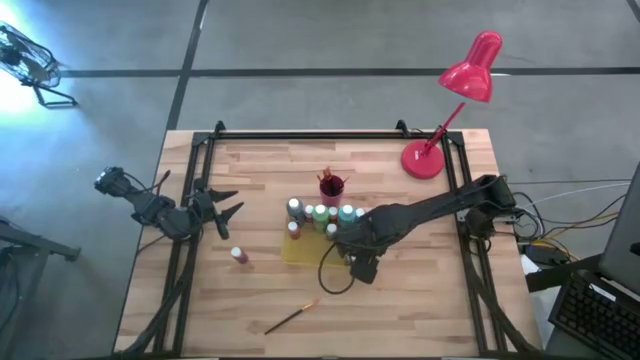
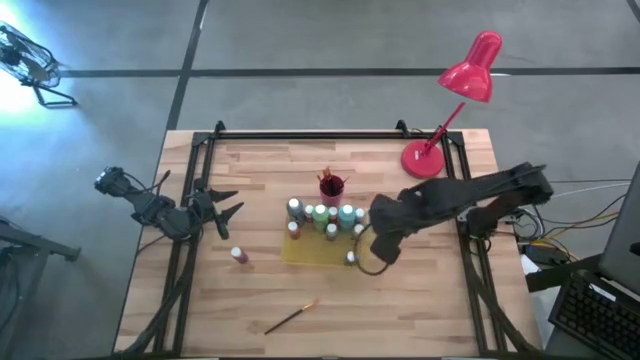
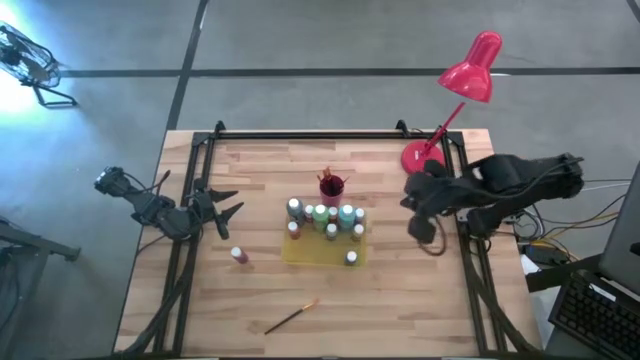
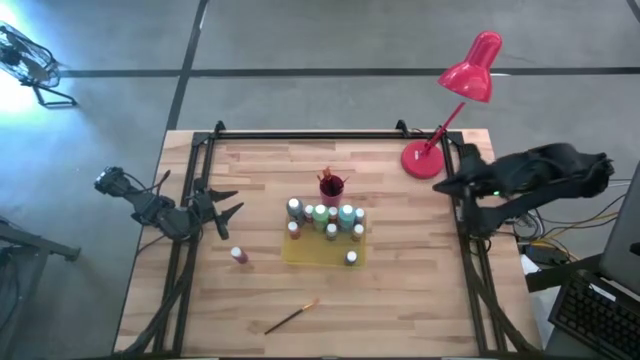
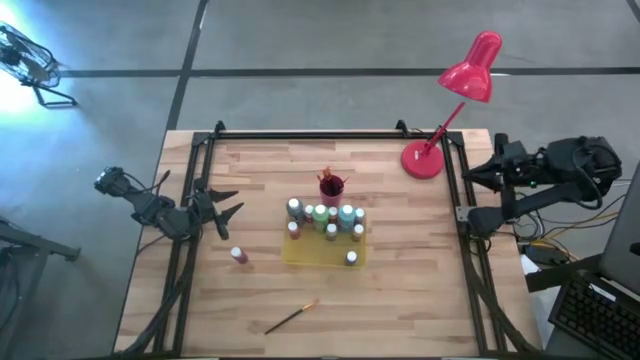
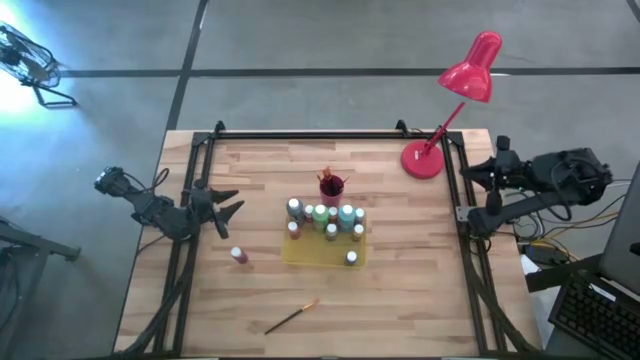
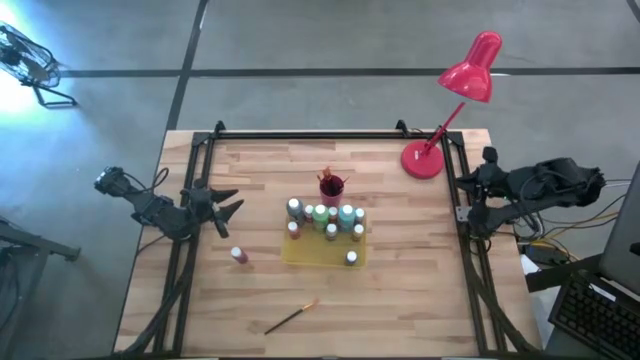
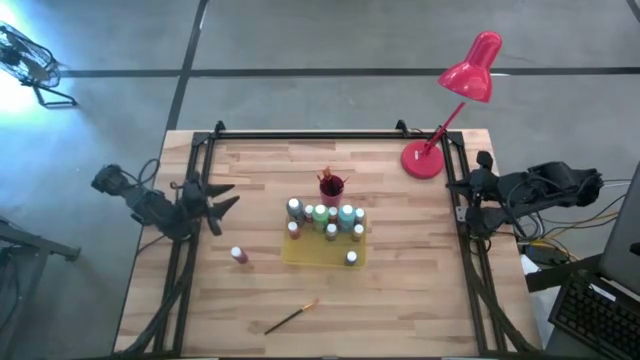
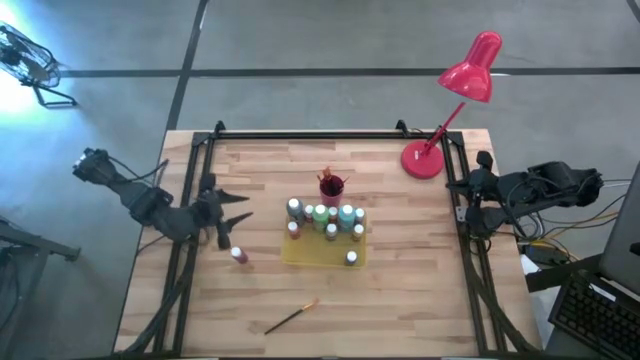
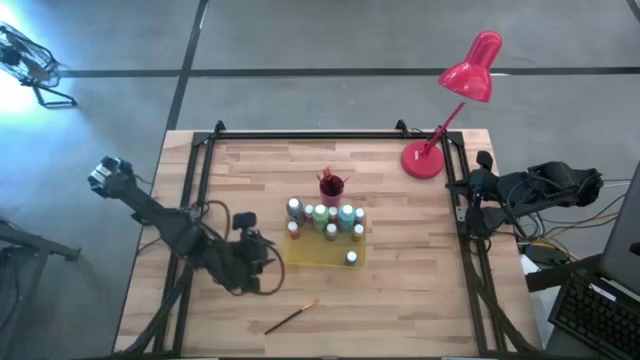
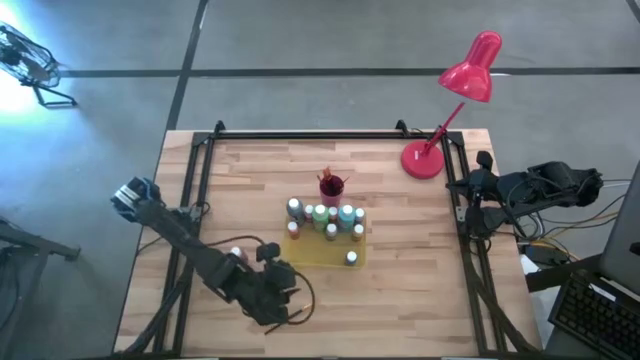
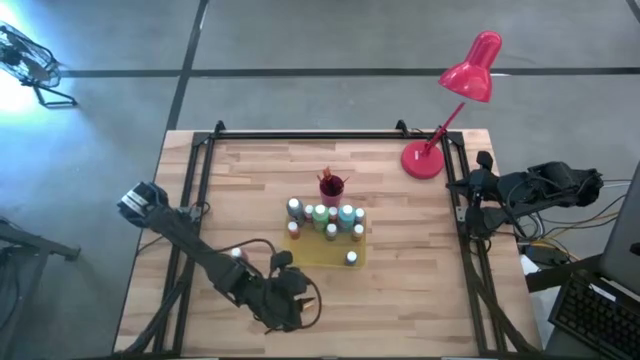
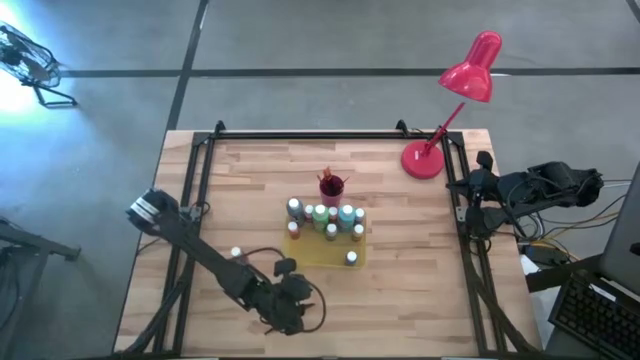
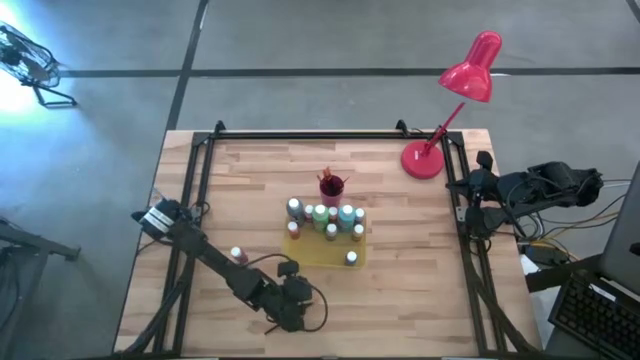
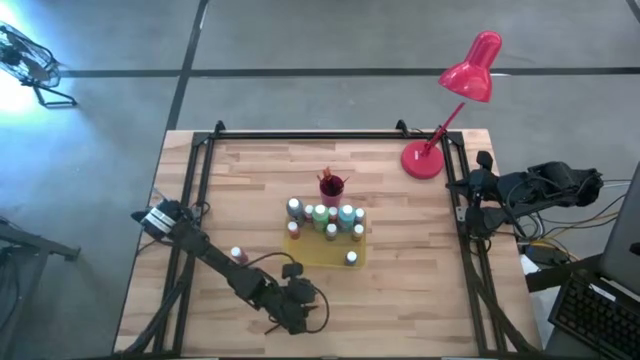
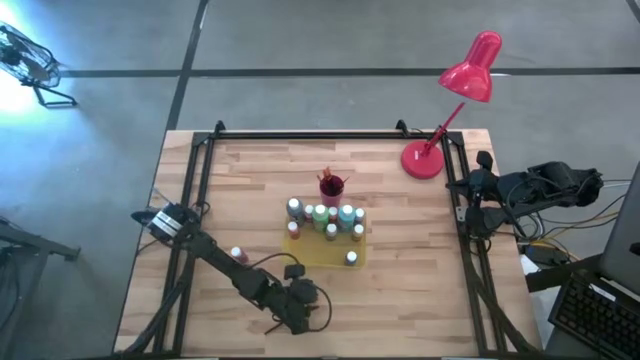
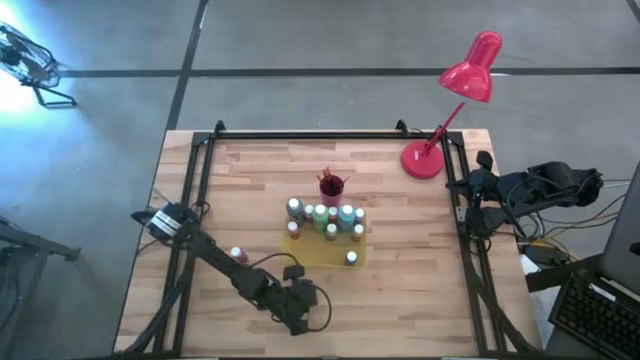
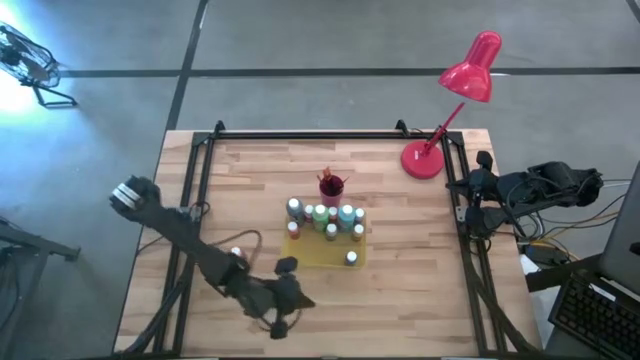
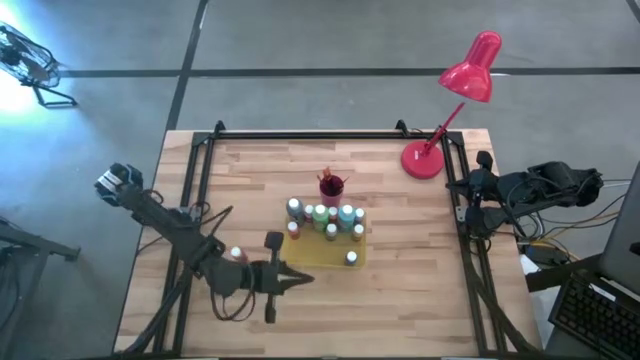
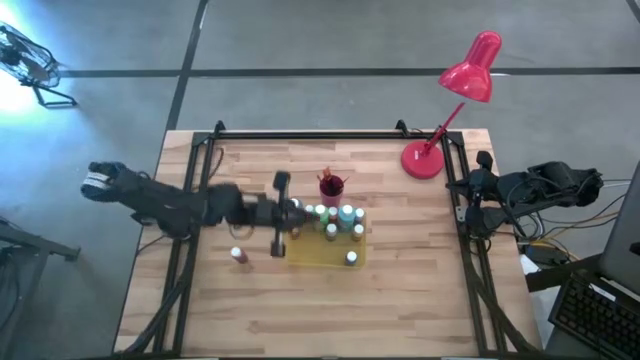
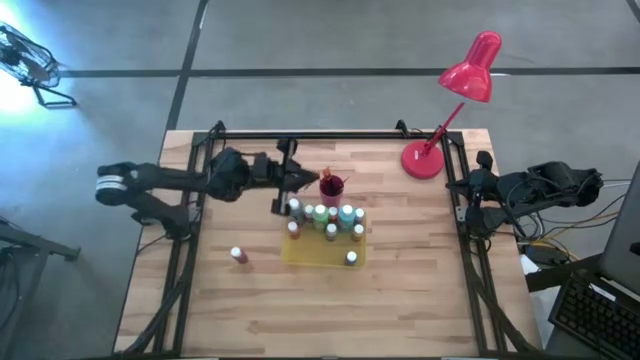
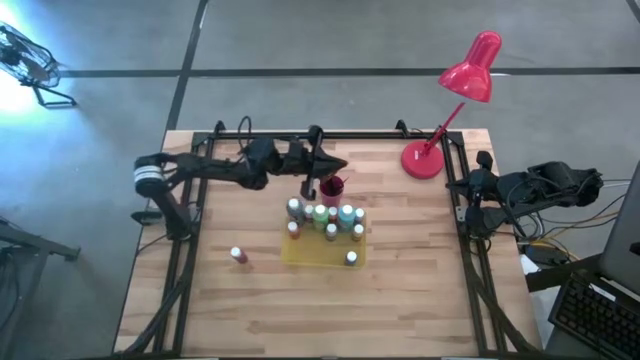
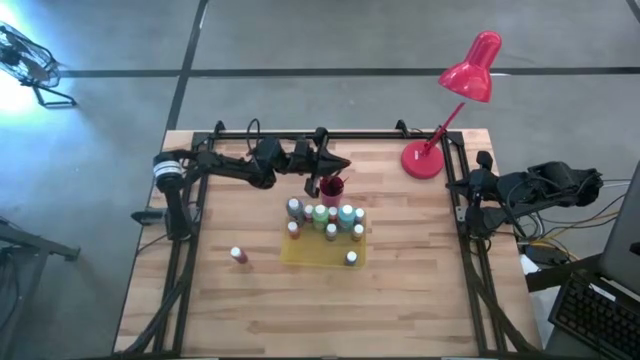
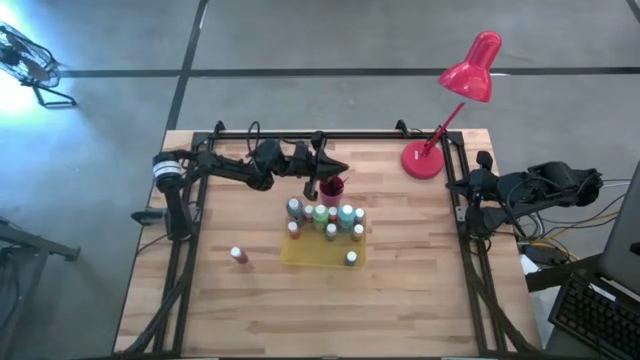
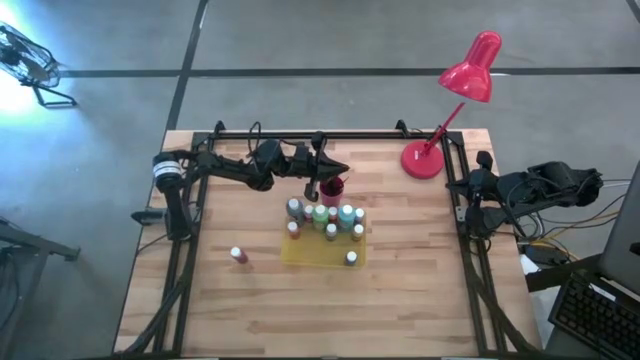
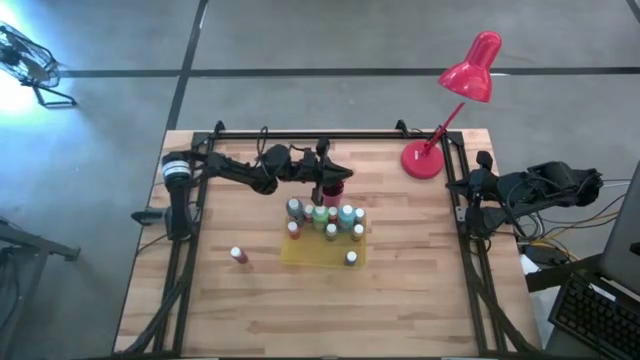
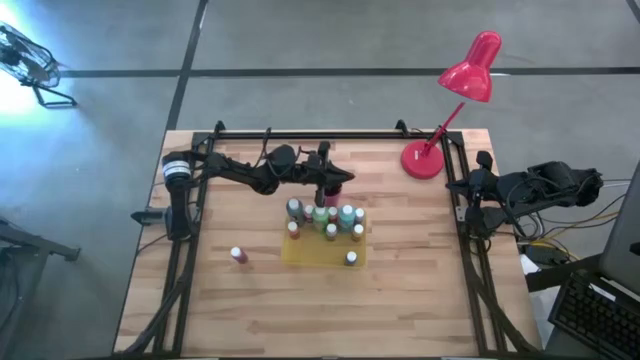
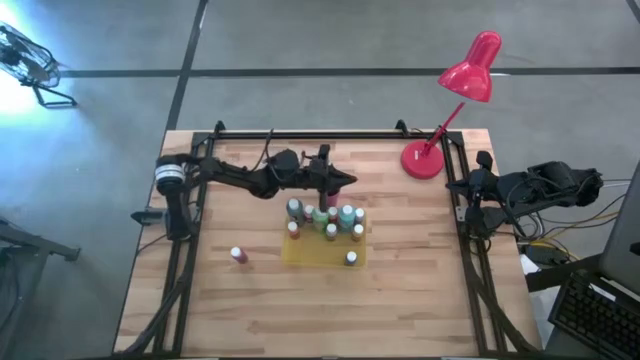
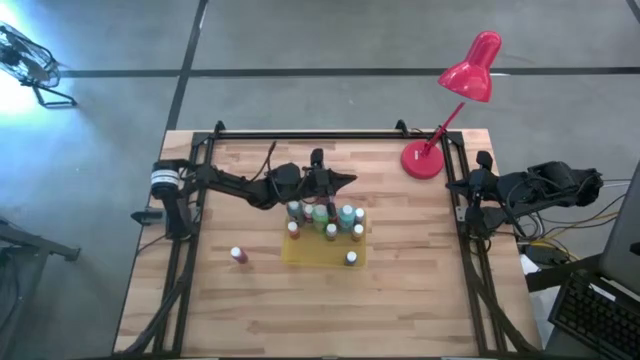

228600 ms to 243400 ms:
Task: Pick & Place Paint Supplies
Put the gold paint brush into the pink cup

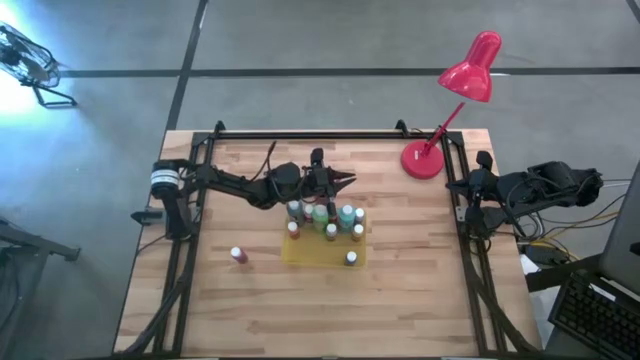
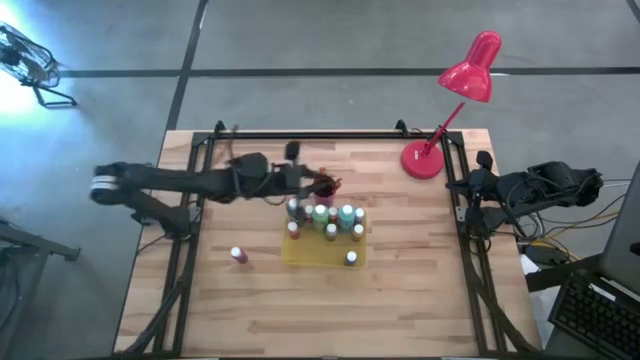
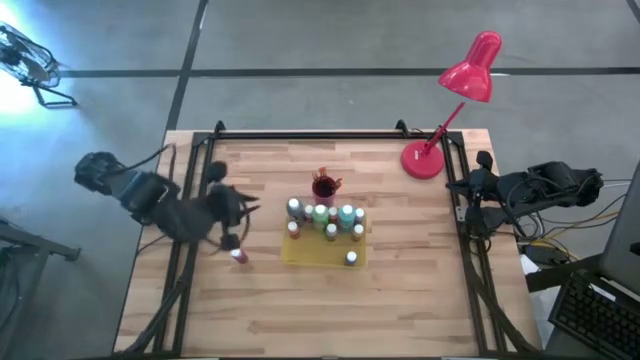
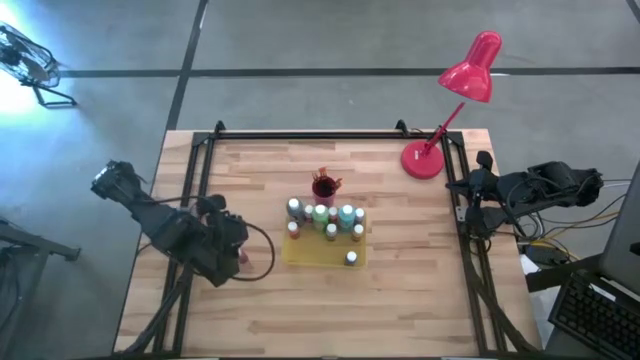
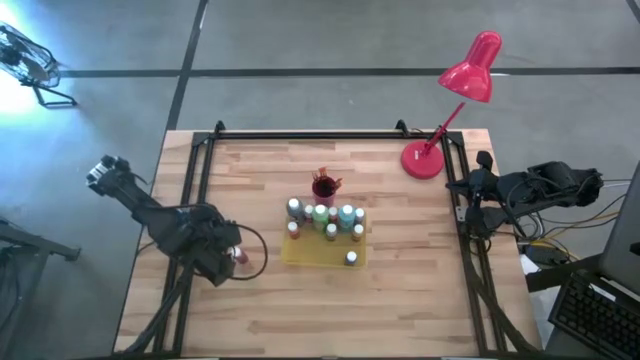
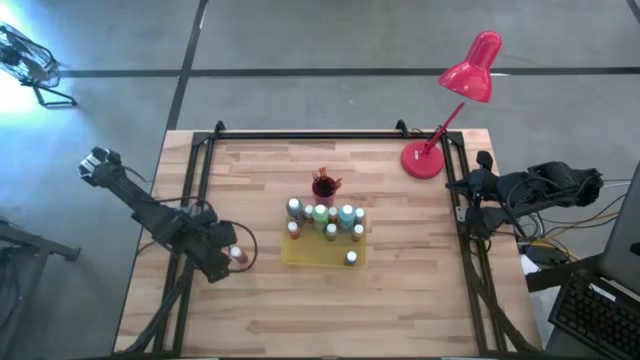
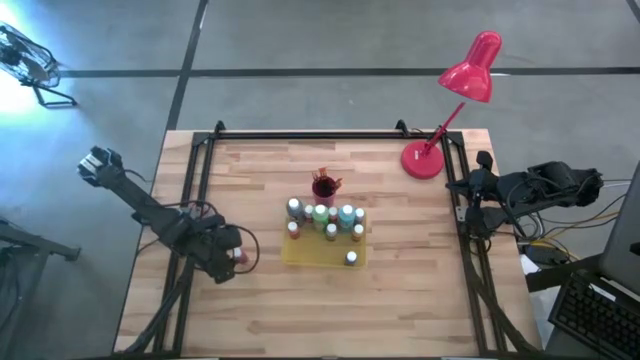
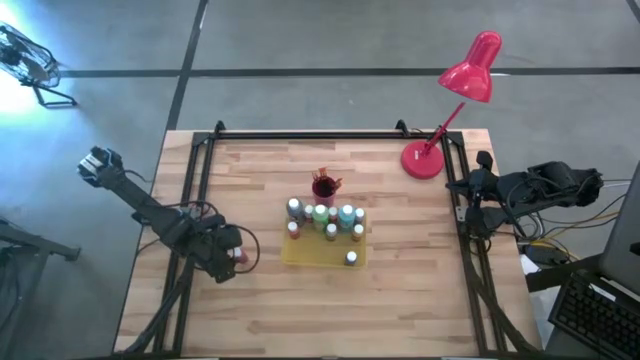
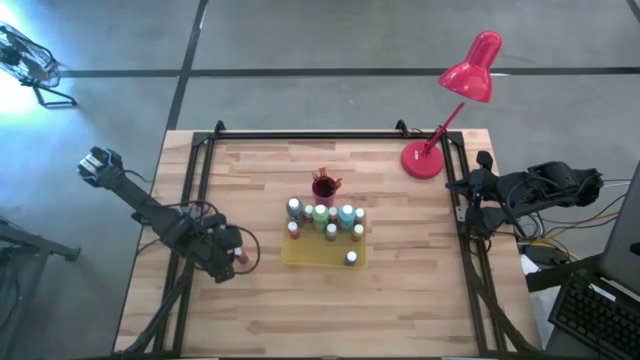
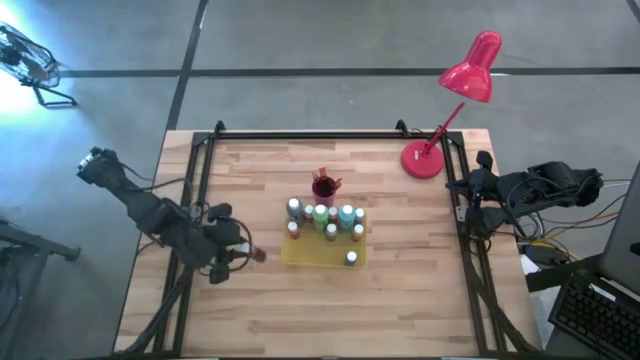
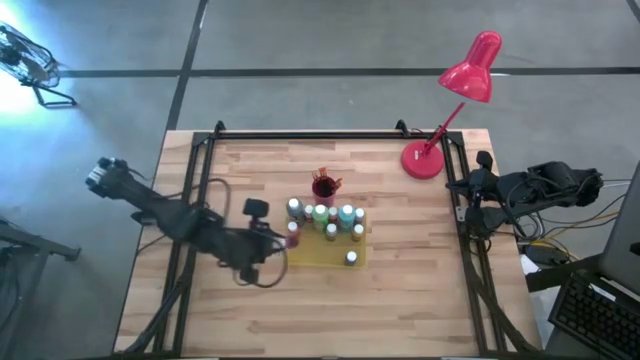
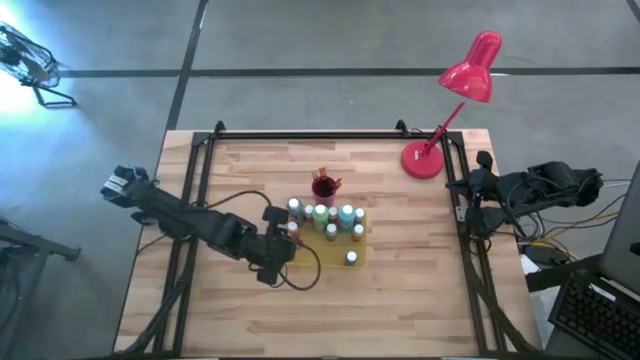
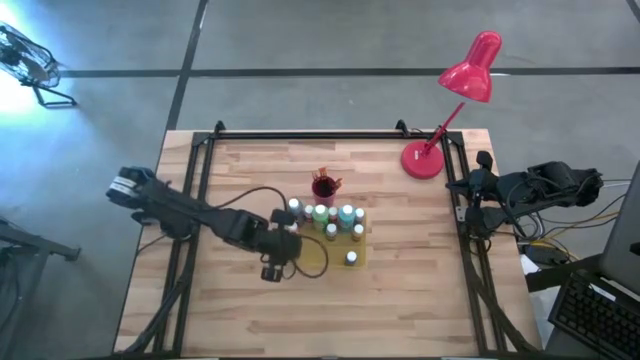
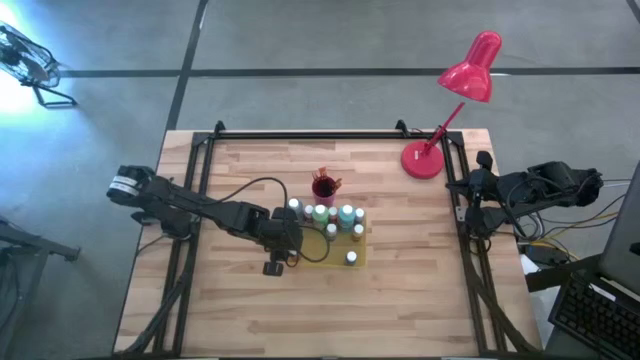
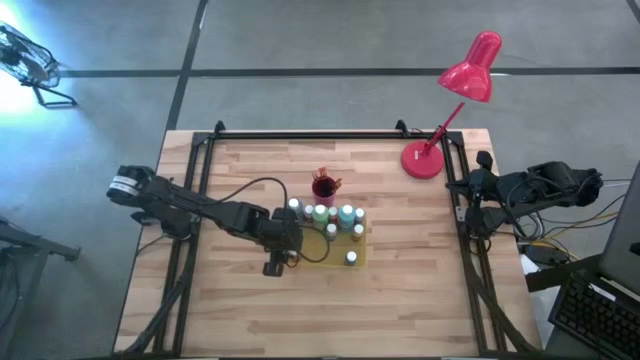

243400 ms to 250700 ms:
Put the small pink paint bottle into the yellow bin
